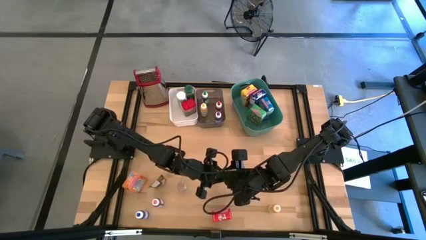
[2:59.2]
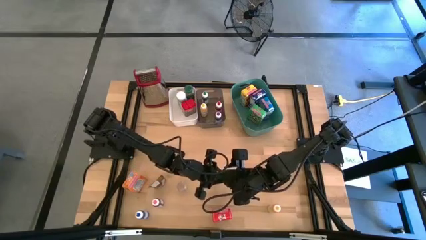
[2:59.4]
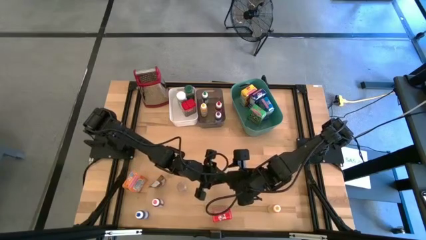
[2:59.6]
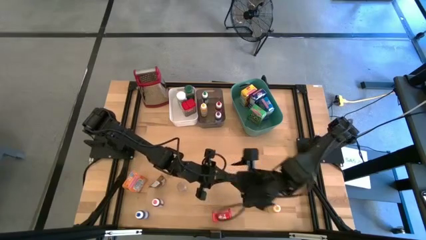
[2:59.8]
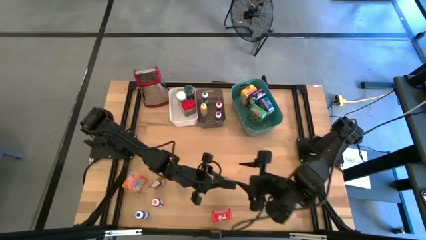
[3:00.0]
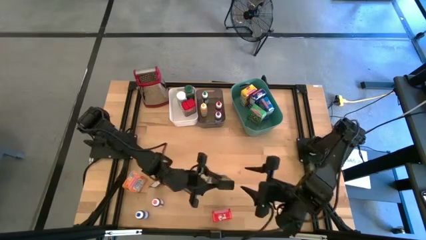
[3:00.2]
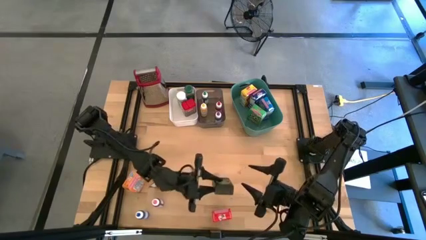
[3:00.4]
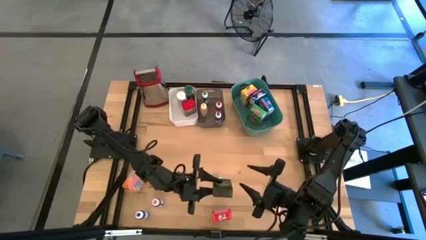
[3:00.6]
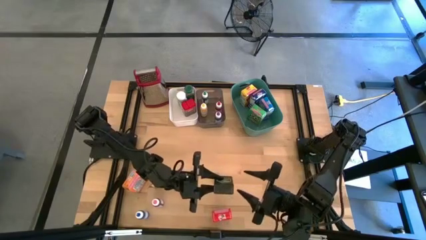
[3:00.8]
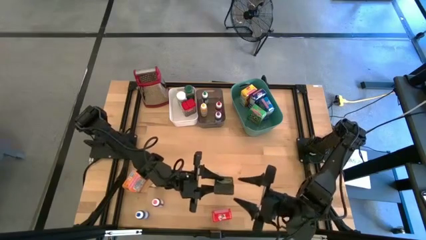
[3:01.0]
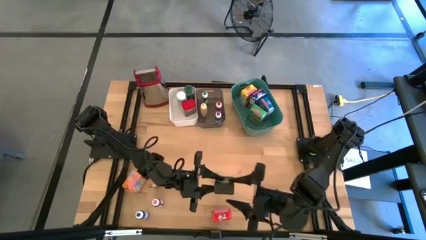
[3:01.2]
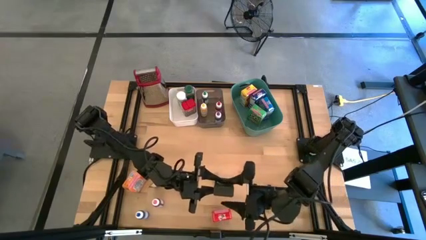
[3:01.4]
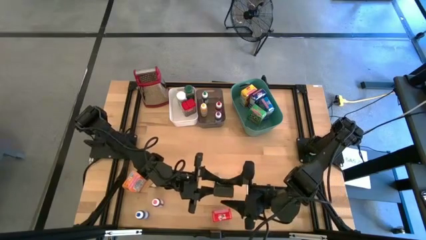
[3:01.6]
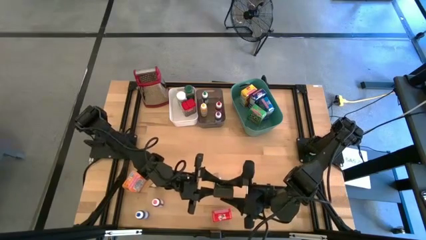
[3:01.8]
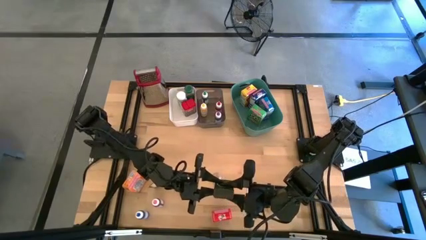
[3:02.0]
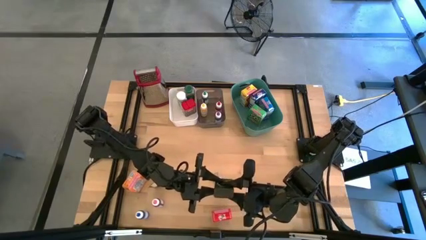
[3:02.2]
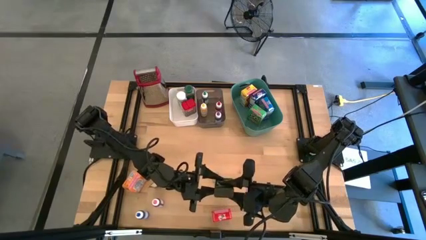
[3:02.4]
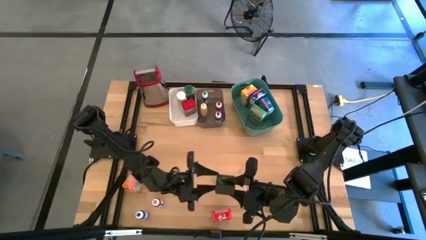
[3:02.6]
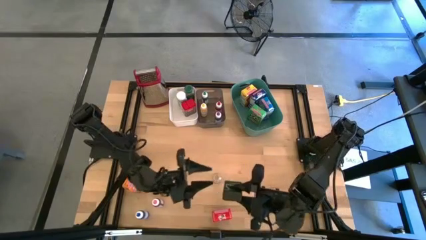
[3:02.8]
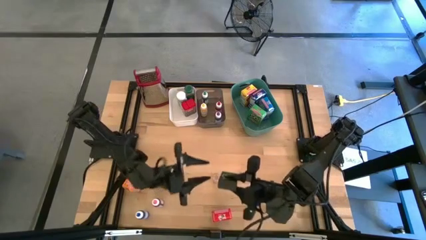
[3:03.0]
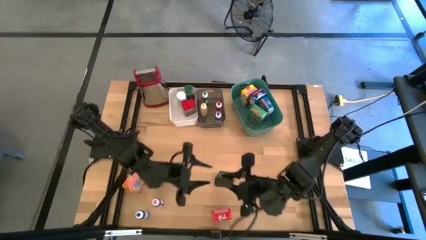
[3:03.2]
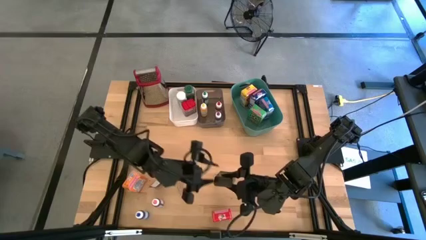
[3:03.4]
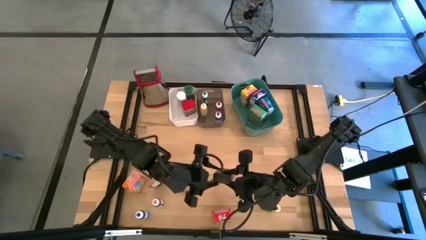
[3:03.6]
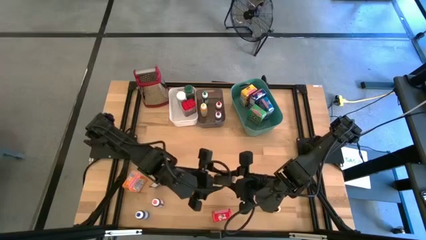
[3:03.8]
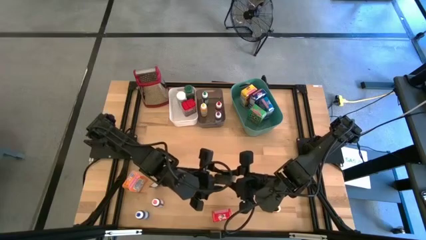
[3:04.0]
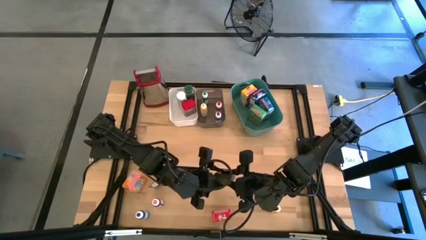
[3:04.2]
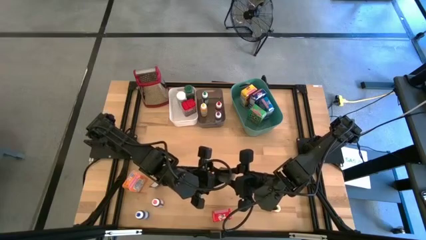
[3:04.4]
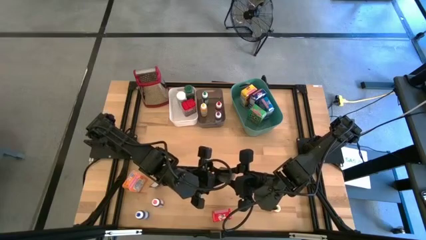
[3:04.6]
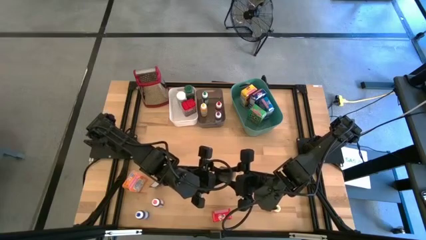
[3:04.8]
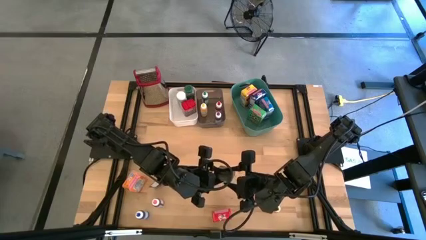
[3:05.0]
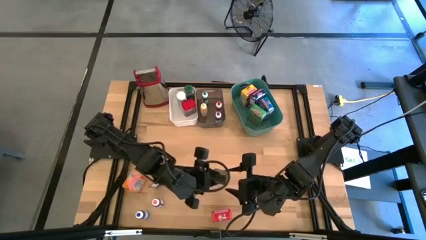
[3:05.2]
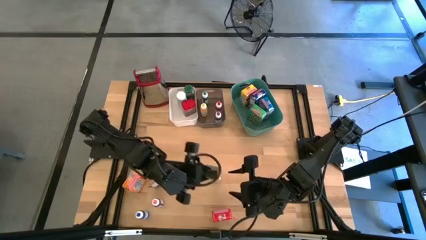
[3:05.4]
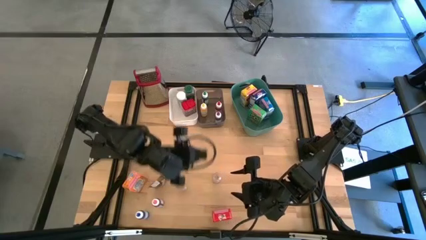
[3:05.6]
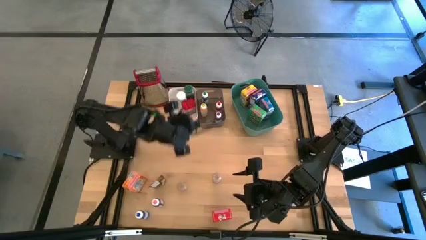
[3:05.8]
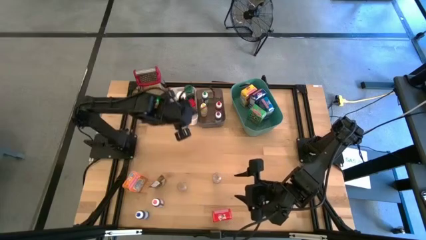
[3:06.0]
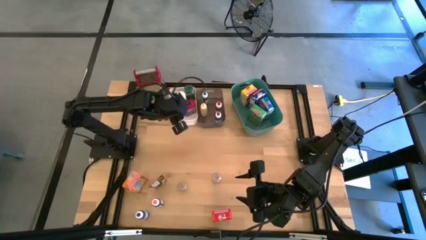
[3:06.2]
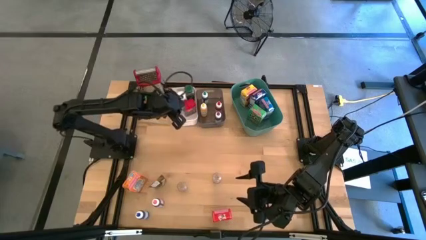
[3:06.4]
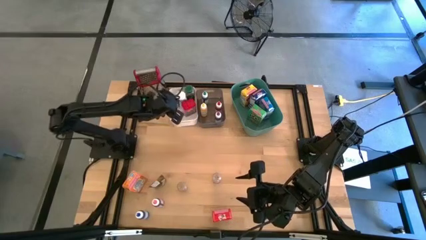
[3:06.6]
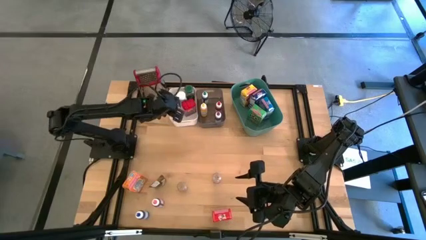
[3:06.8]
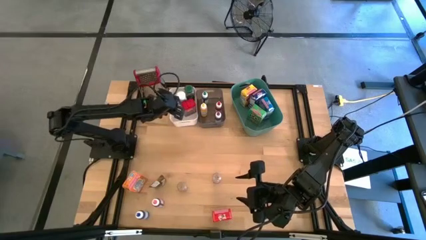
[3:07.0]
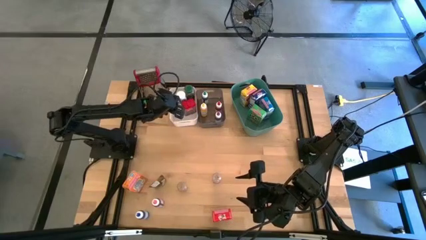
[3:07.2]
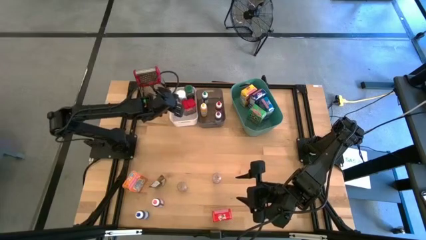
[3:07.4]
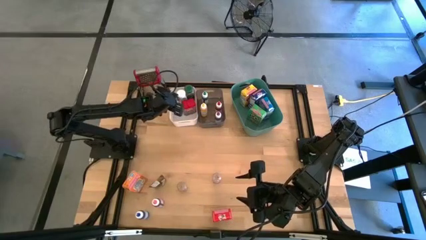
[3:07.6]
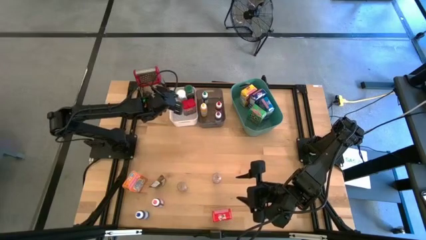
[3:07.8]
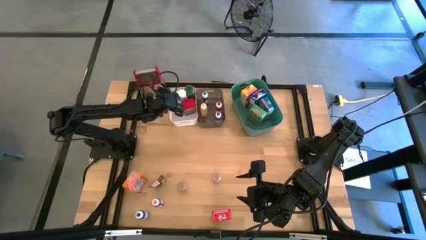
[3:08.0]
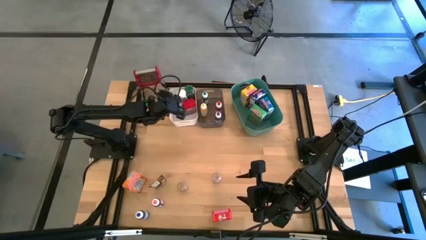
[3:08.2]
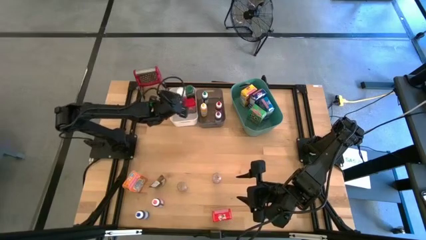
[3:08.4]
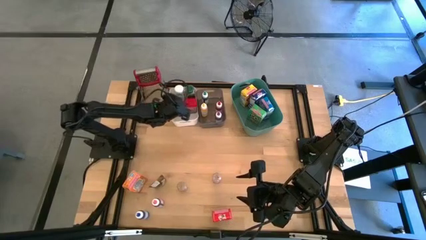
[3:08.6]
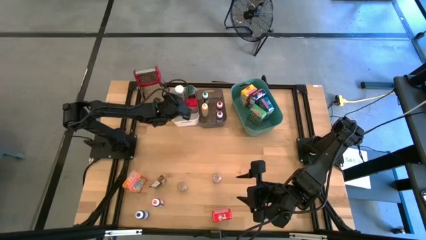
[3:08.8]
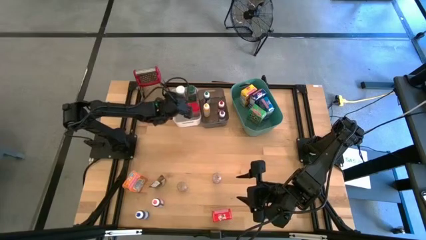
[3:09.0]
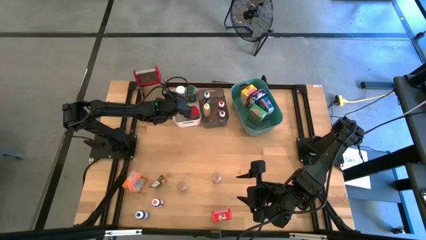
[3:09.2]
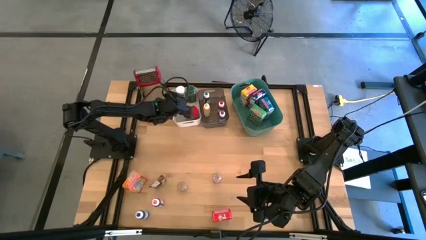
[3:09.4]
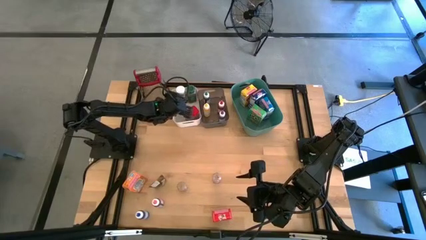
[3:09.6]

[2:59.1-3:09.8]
Task: Pick & Place Kitchen Items
Put the black spice can into the left white bin

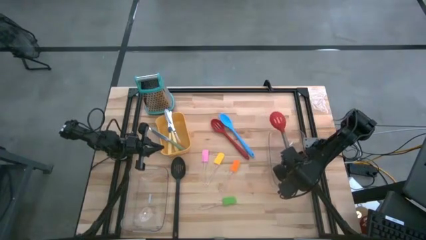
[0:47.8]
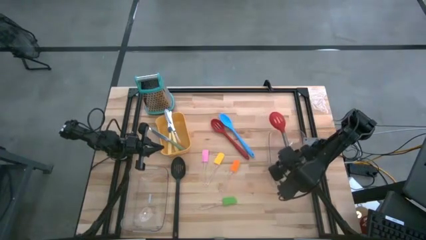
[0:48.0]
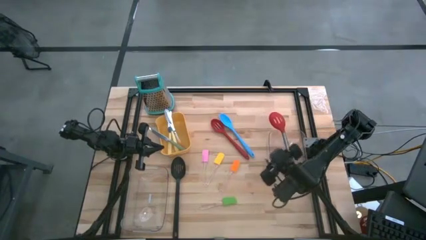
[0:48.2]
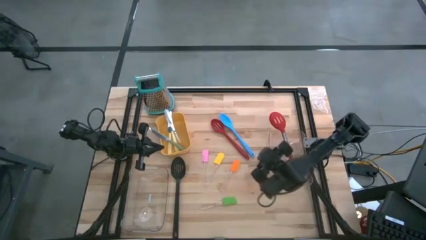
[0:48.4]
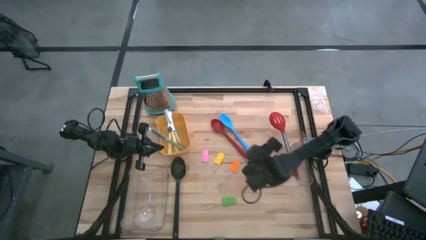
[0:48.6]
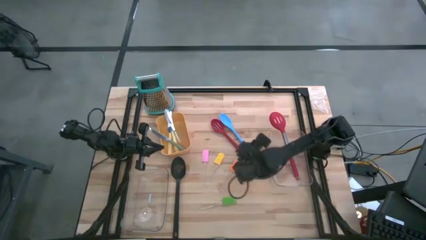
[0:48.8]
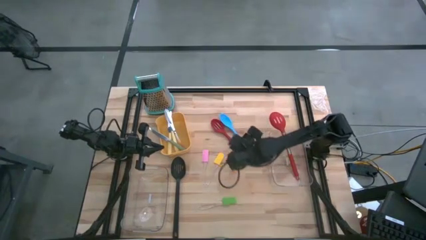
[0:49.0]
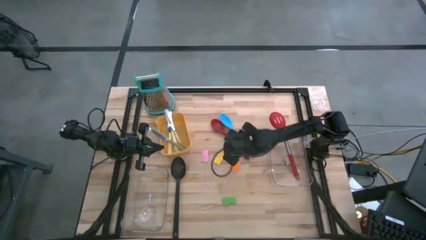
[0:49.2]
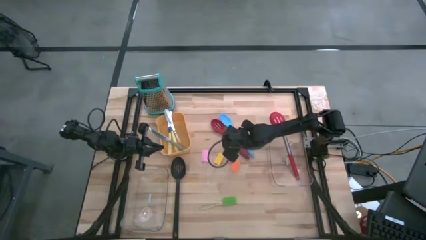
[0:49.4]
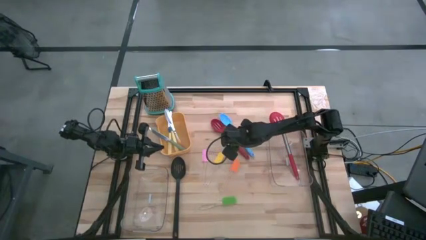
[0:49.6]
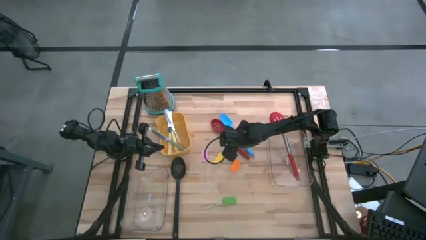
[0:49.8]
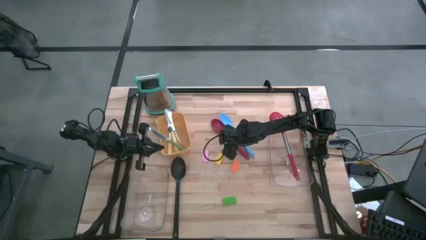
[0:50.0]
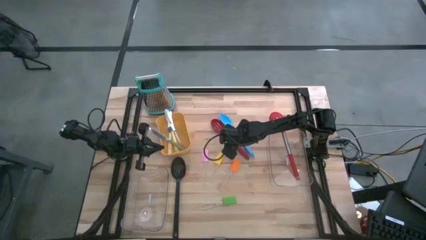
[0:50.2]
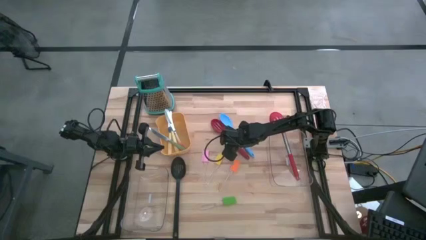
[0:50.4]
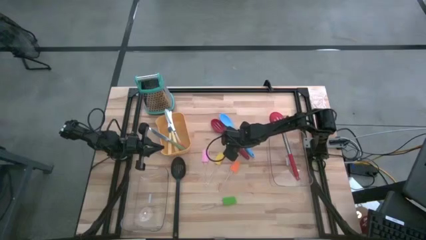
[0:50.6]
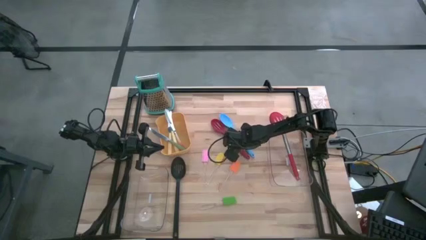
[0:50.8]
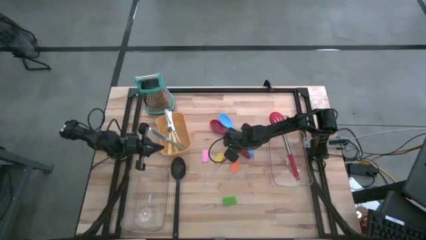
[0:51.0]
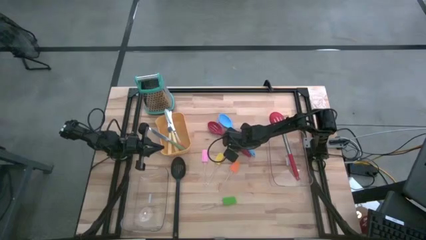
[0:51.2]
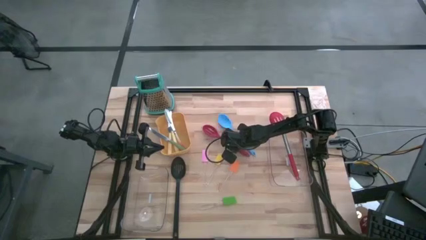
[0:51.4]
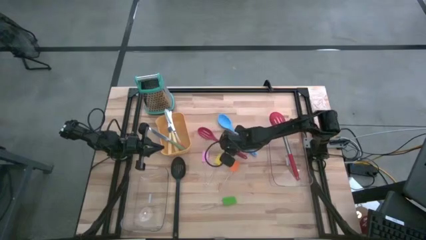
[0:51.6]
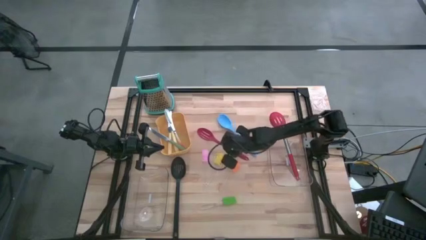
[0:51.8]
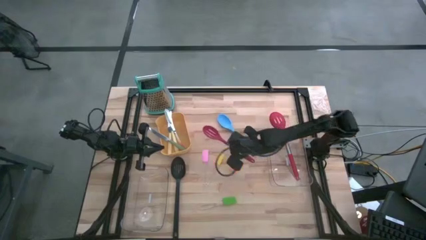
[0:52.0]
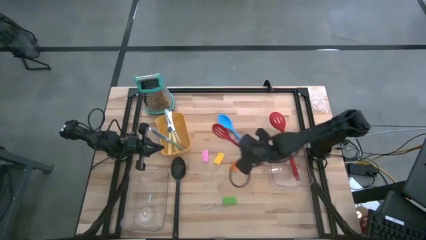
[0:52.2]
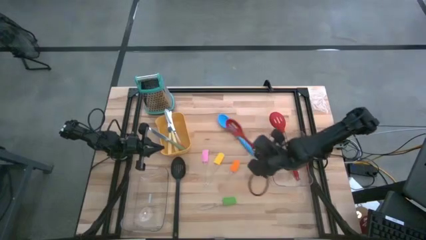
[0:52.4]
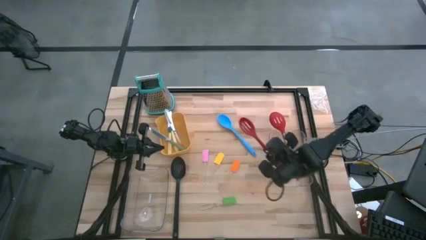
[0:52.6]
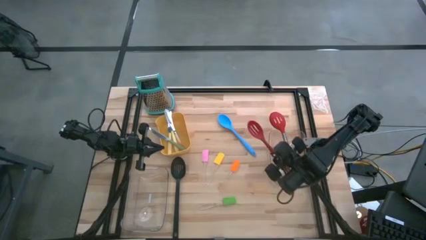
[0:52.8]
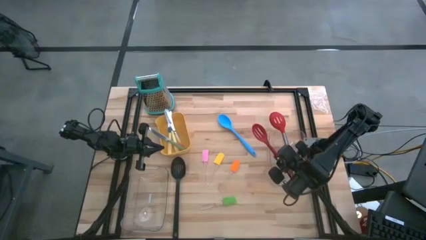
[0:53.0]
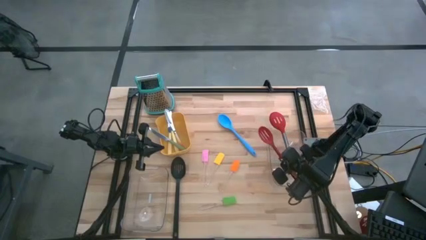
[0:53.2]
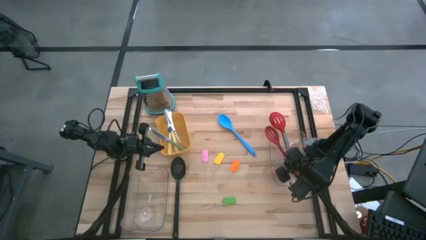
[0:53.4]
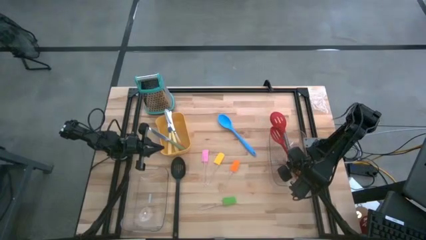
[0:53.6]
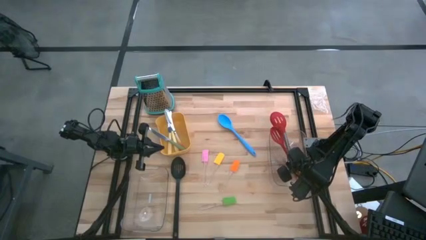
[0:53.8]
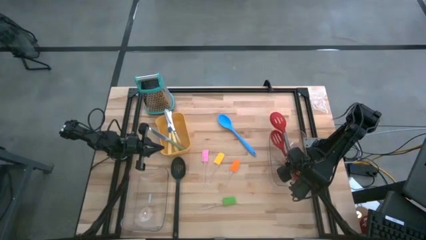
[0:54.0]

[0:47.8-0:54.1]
Task: Pick & Place Kitchen Items
Put the red slotted spoon into the right transparent bin
